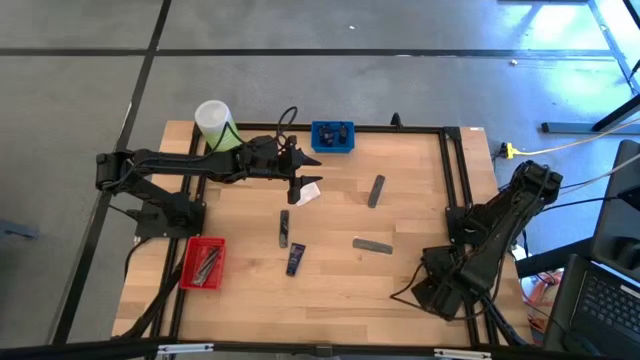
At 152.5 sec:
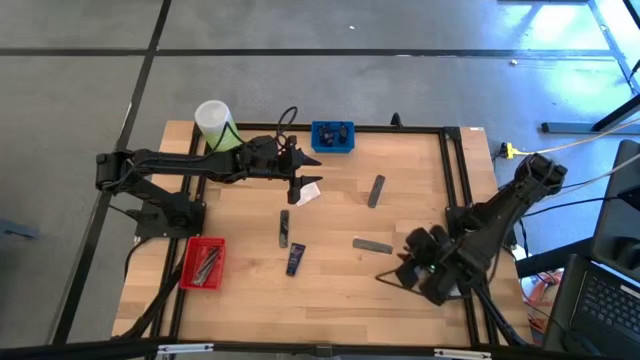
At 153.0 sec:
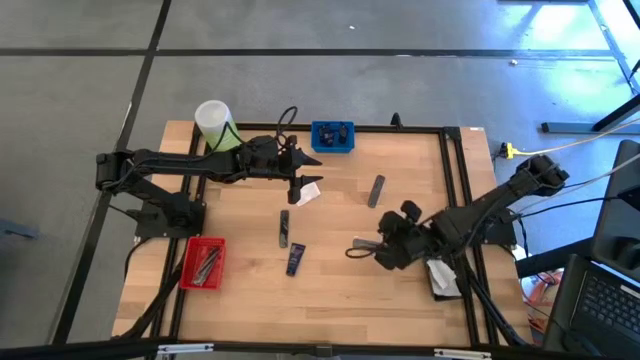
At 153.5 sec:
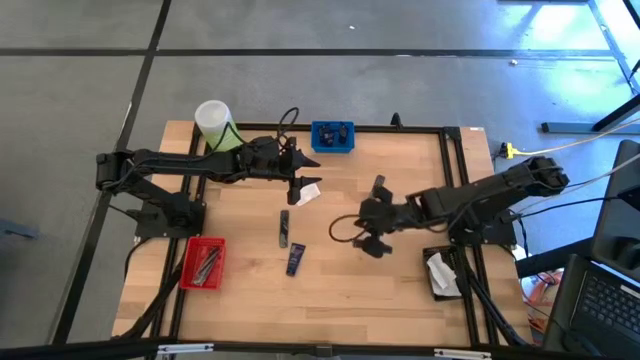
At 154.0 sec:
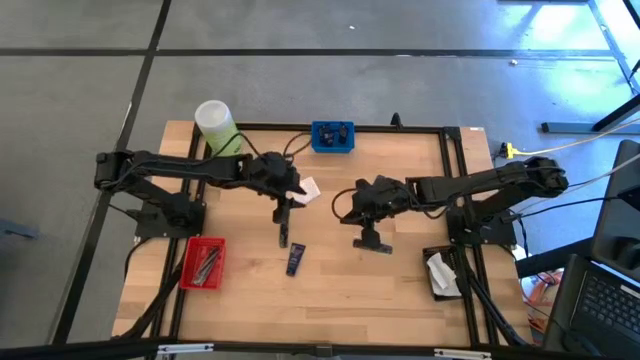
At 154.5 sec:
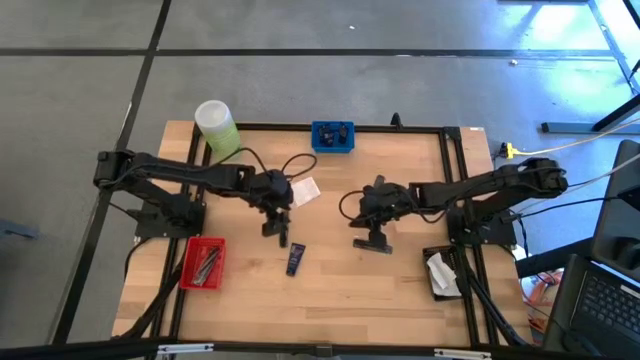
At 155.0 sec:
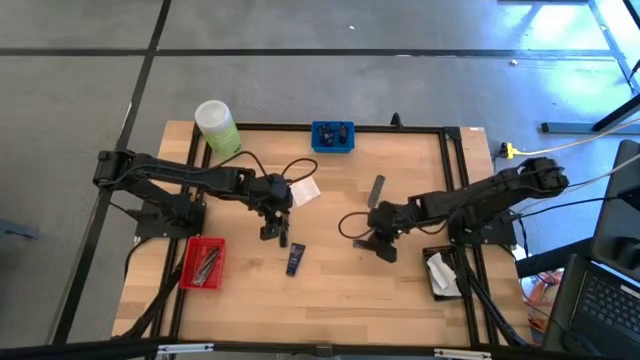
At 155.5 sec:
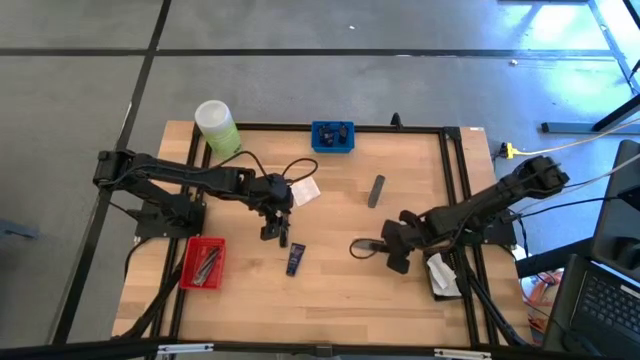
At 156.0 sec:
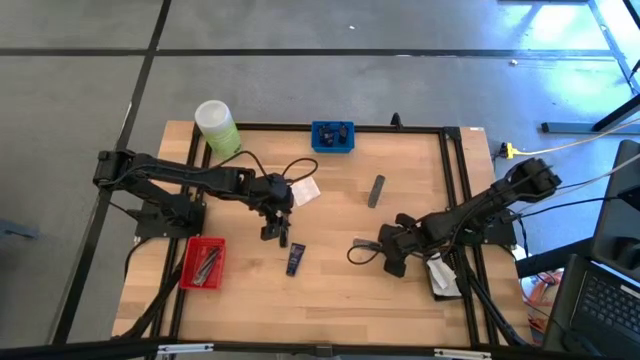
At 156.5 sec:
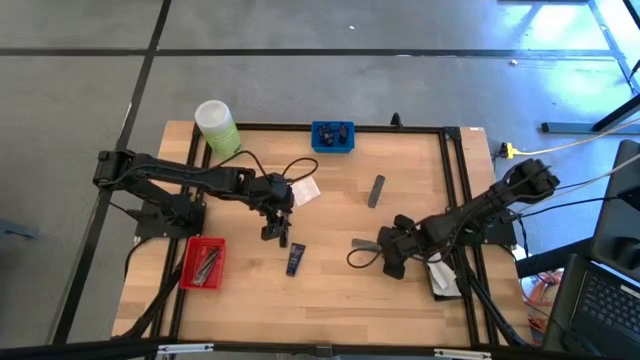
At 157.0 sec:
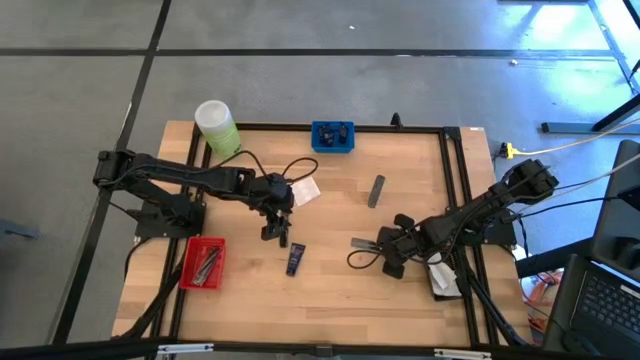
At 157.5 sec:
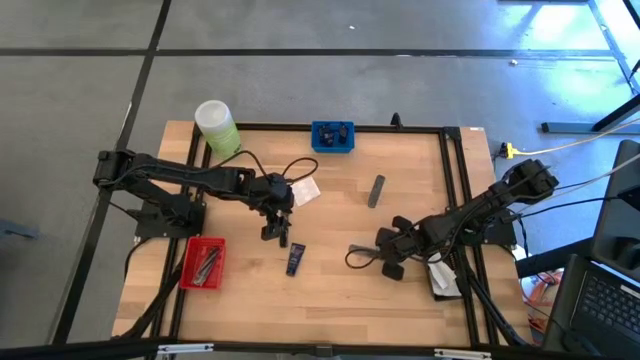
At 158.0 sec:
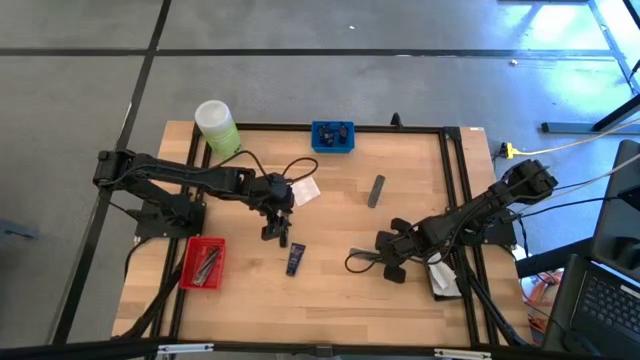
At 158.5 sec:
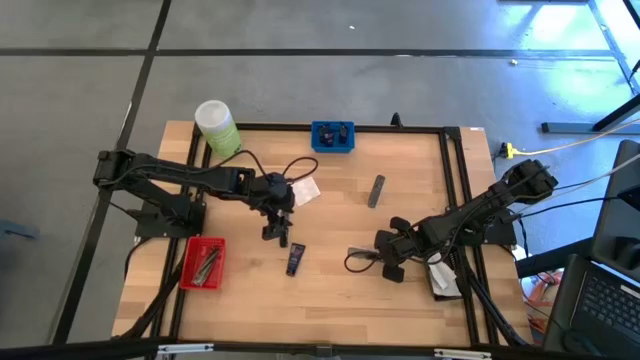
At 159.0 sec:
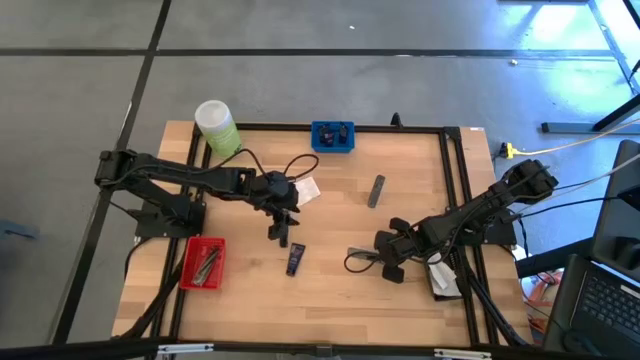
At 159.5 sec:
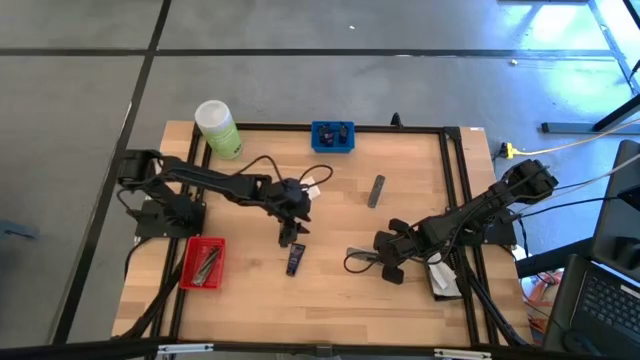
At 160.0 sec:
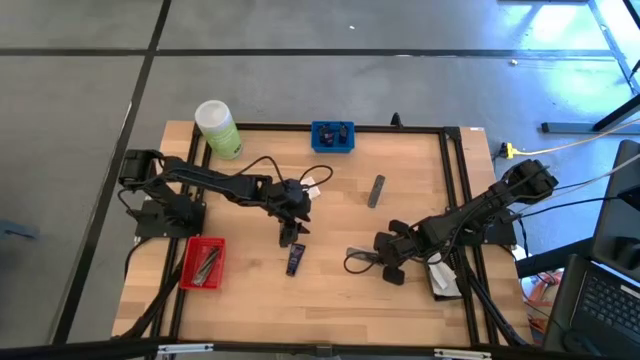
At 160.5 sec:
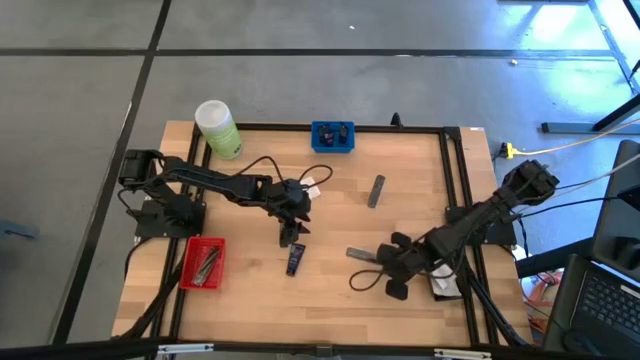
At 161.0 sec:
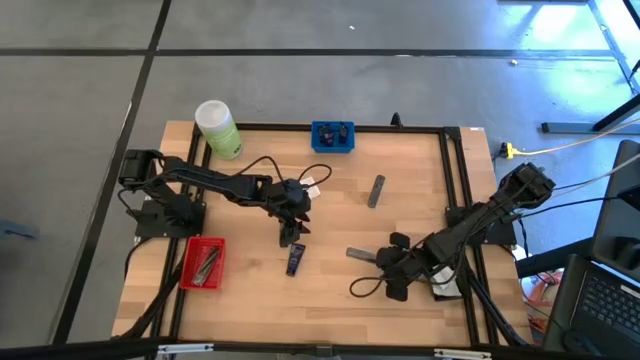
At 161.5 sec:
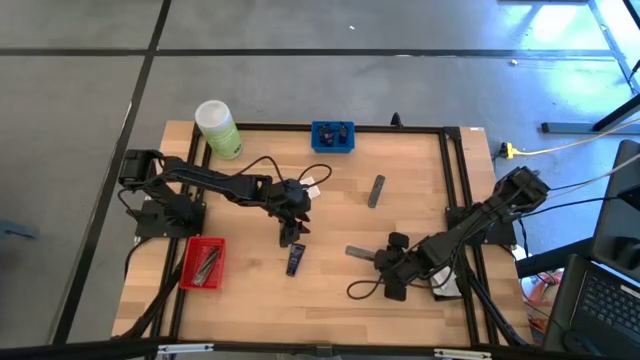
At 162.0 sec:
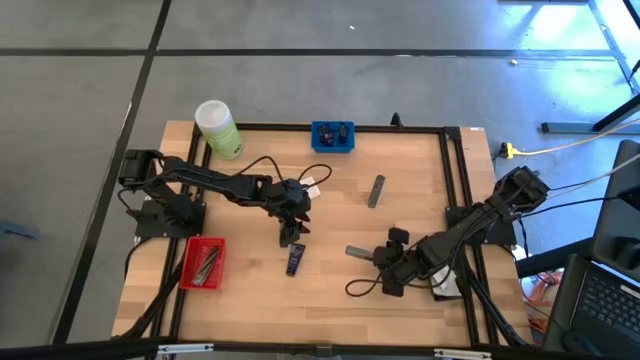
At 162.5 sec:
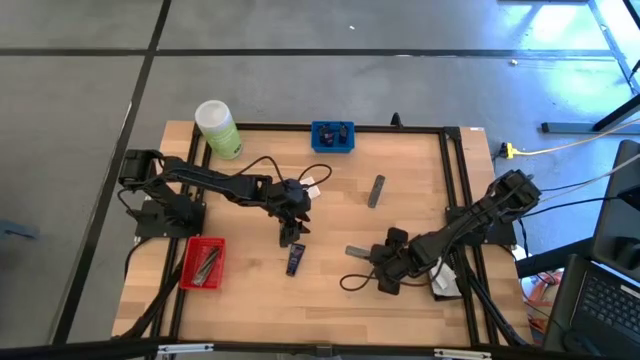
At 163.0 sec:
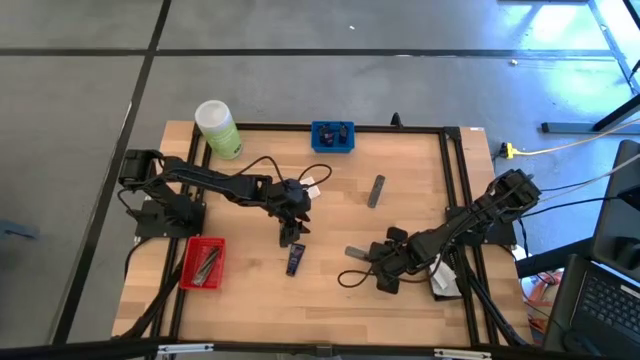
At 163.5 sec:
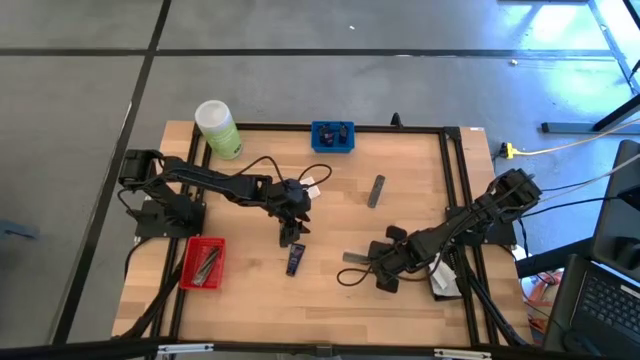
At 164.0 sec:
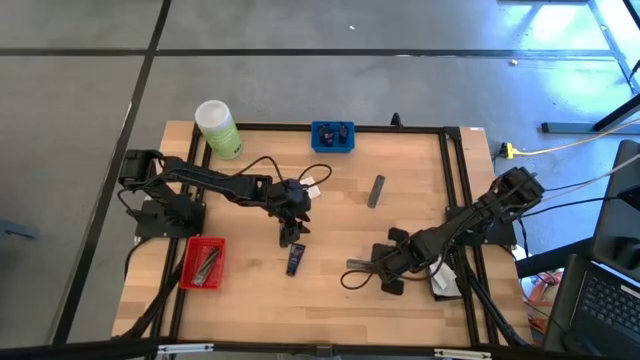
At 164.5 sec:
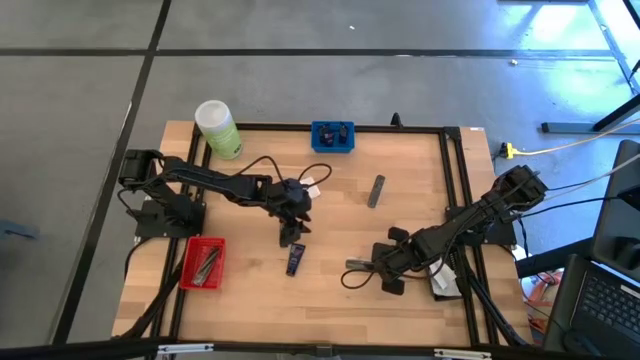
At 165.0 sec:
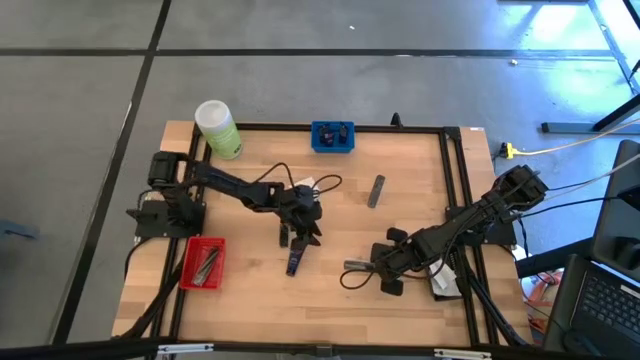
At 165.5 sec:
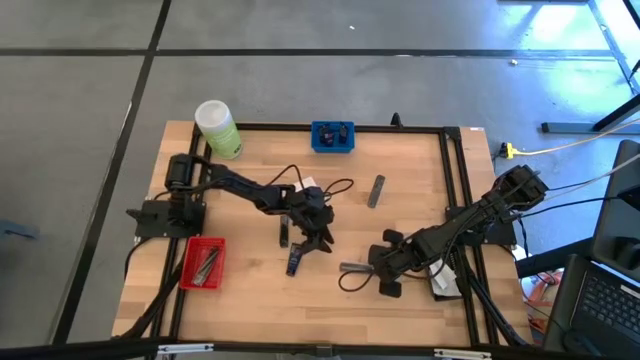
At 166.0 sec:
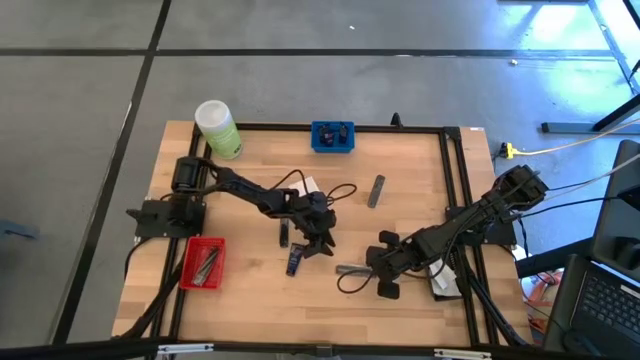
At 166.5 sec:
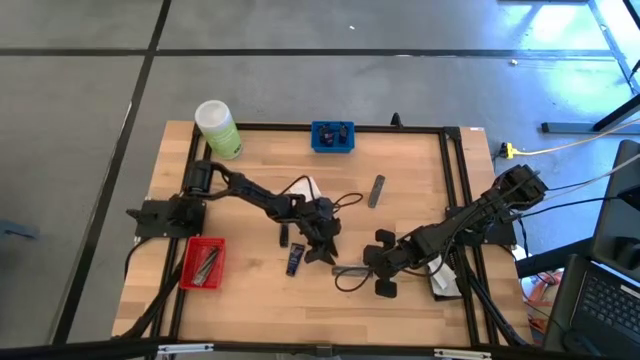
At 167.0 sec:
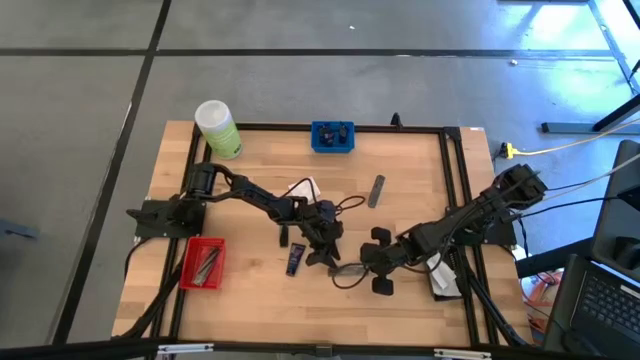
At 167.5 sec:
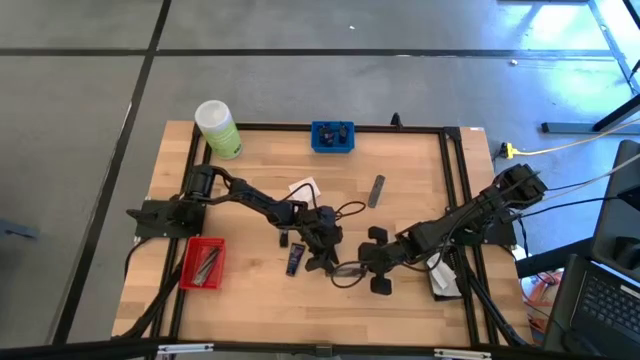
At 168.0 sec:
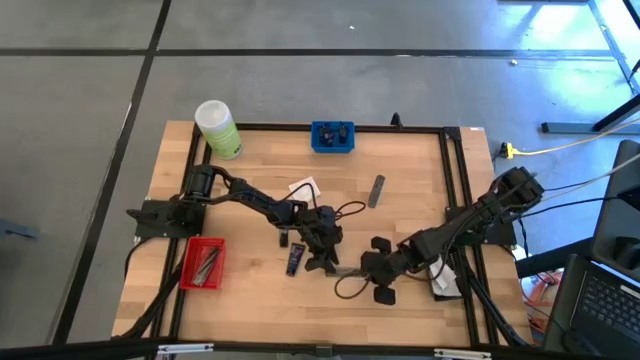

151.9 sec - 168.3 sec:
Task: Pick & Place Travel size toiletries
Put the black hair comb into the red basket
